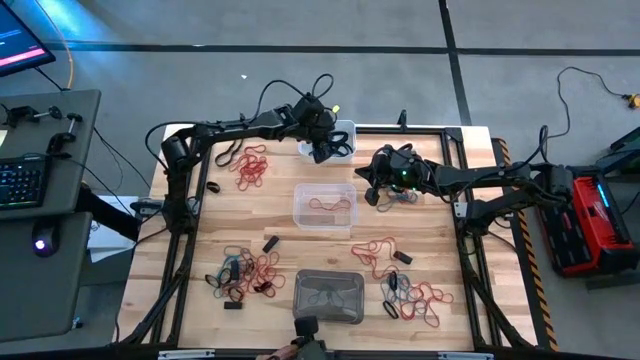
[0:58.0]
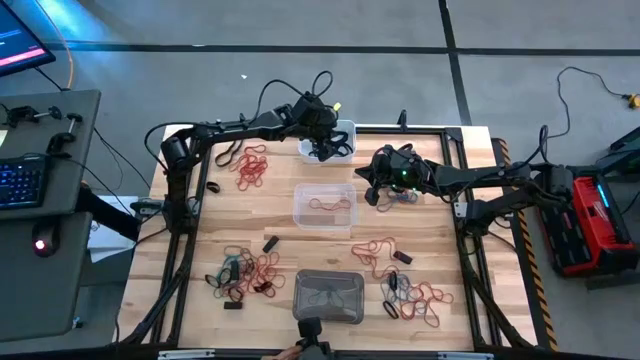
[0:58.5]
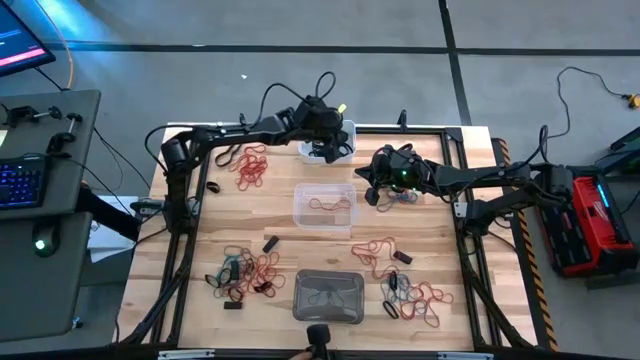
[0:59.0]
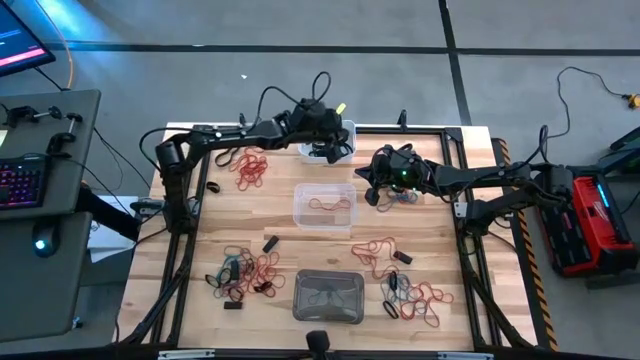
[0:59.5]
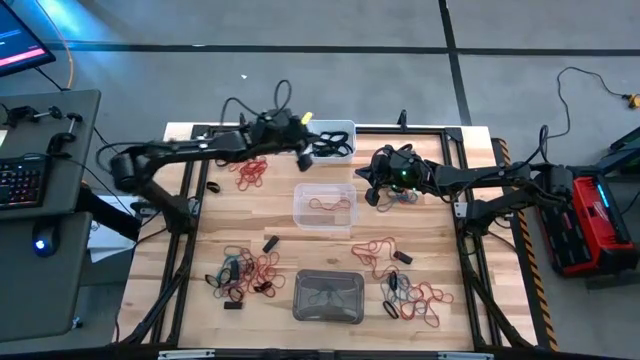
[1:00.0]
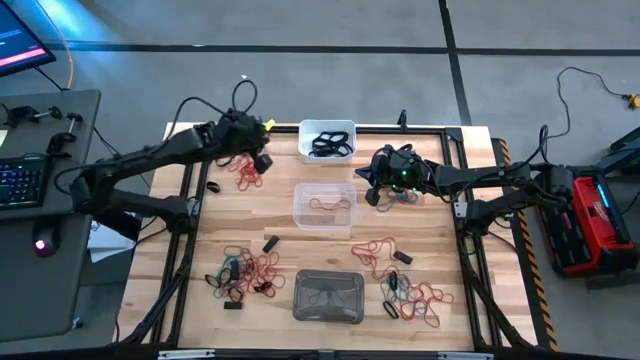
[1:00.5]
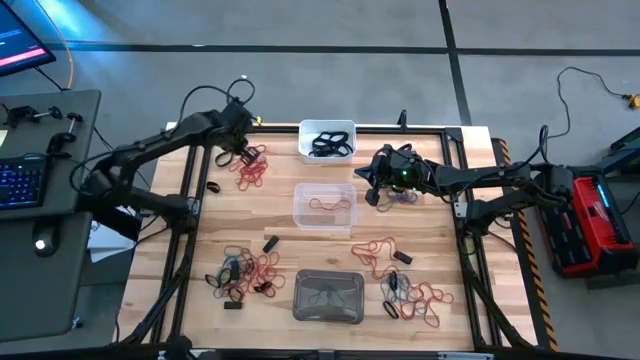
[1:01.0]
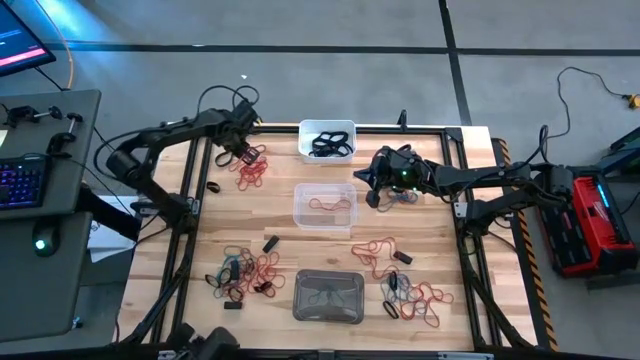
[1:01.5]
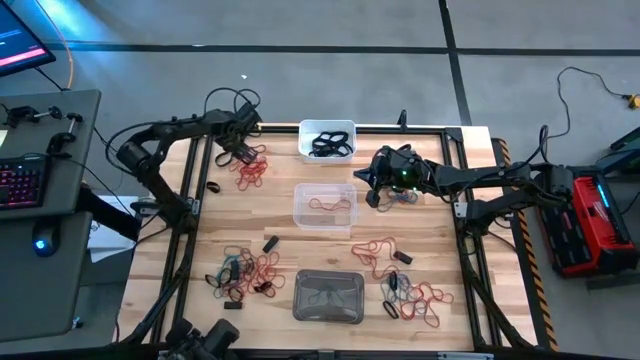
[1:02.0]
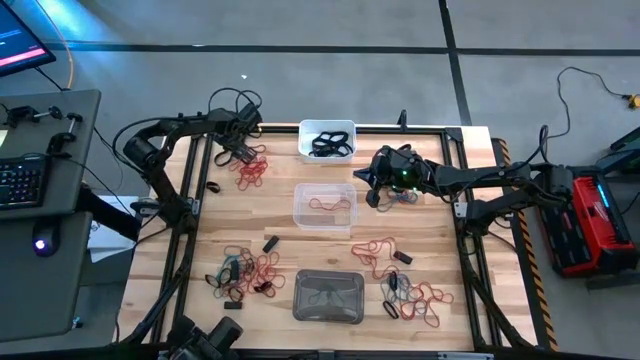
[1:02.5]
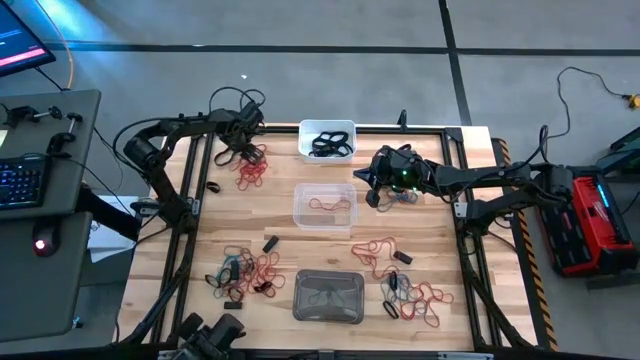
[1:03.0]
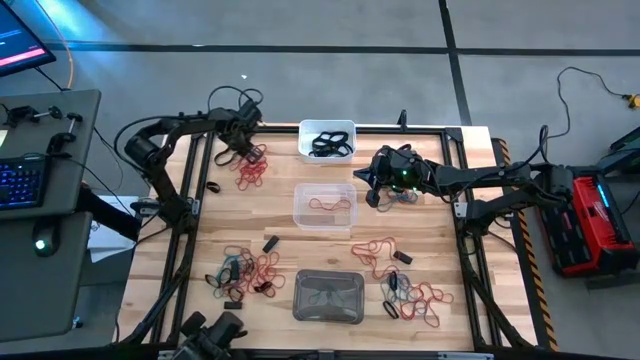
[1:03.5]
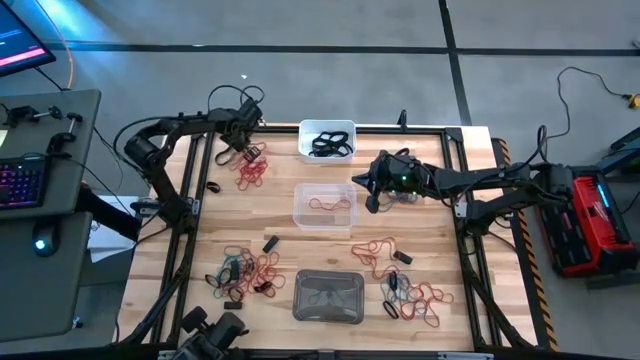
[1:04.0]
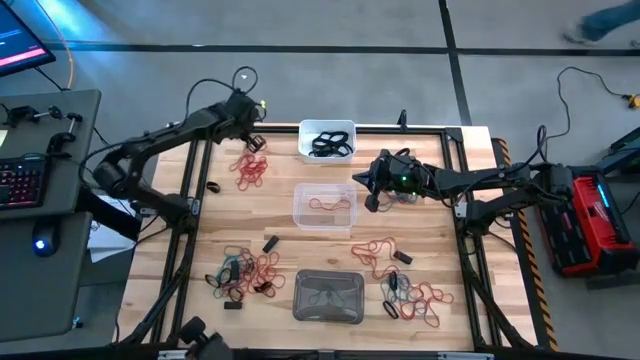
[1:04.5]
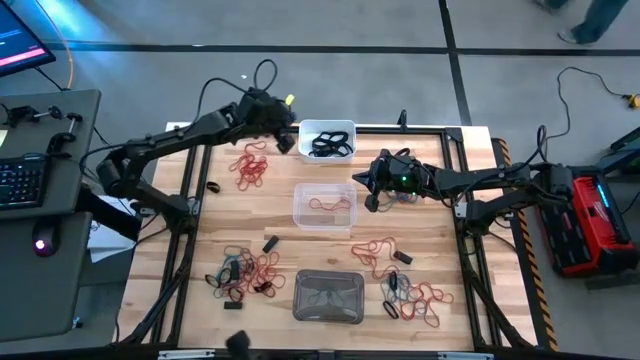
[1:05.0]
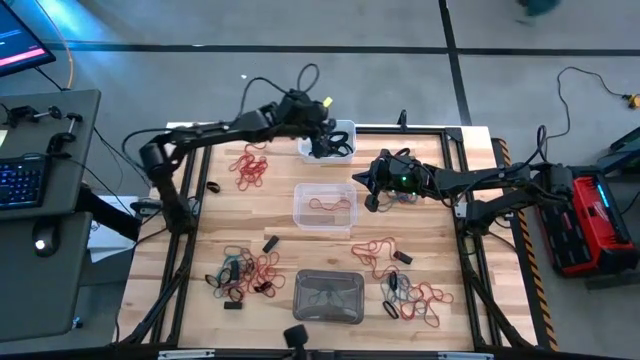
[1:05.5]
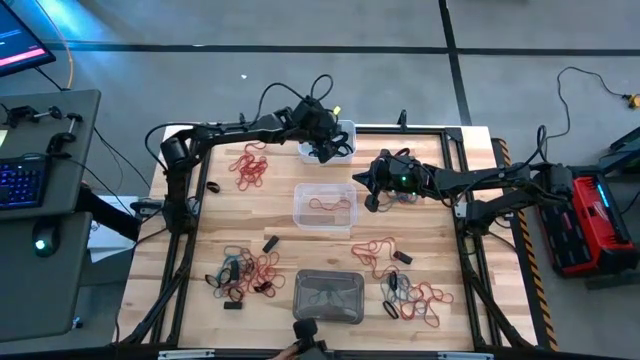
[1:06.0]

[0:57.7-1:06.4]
Task: Sort rubber bands into baskets
Put the black rubber band into the white bin

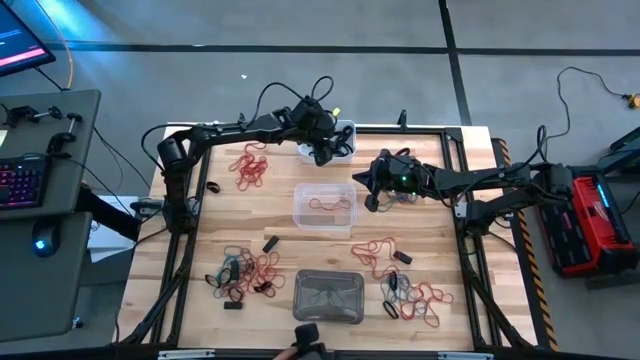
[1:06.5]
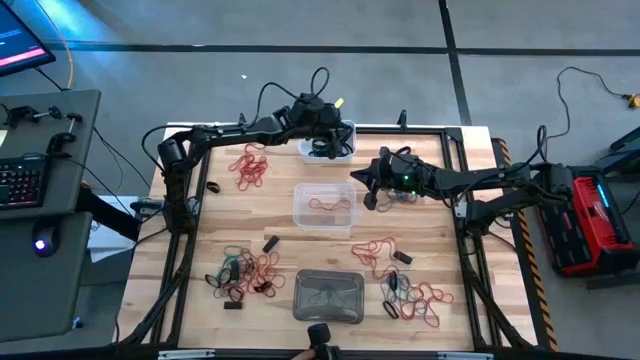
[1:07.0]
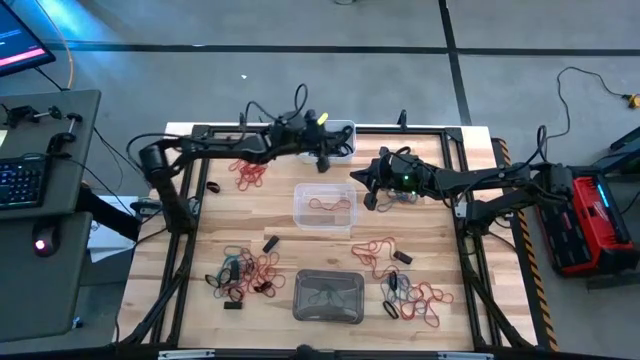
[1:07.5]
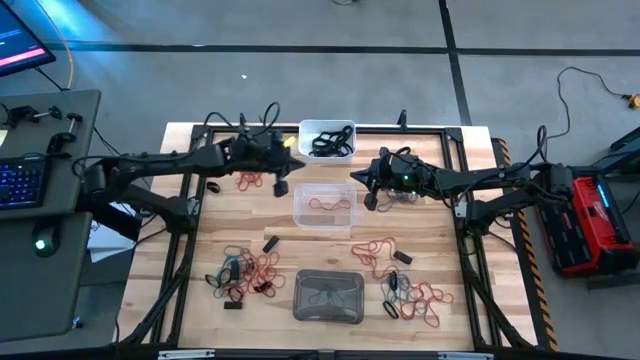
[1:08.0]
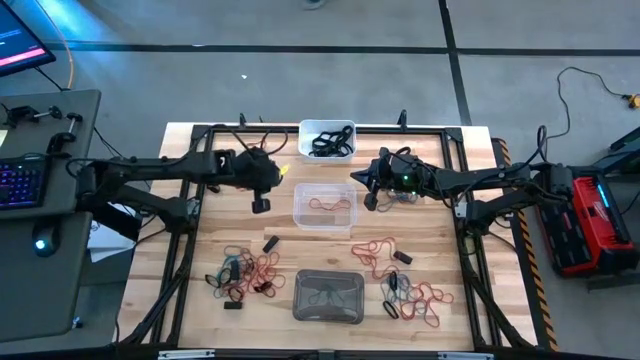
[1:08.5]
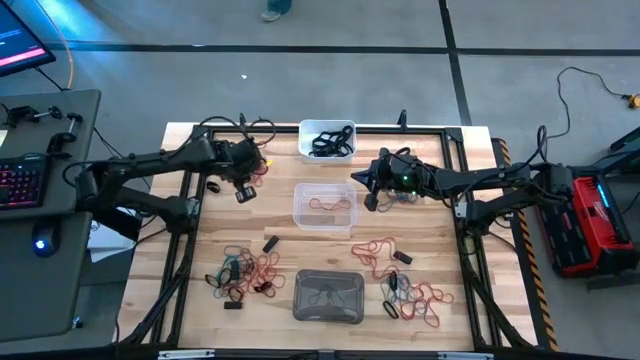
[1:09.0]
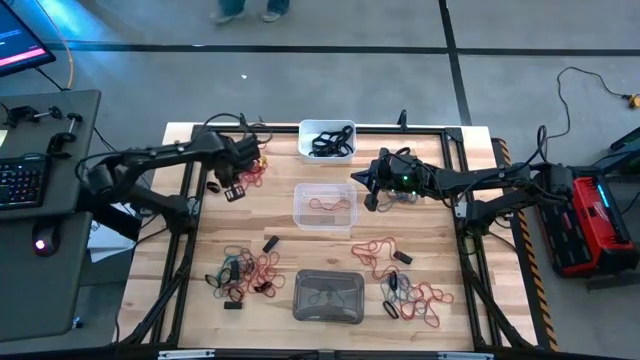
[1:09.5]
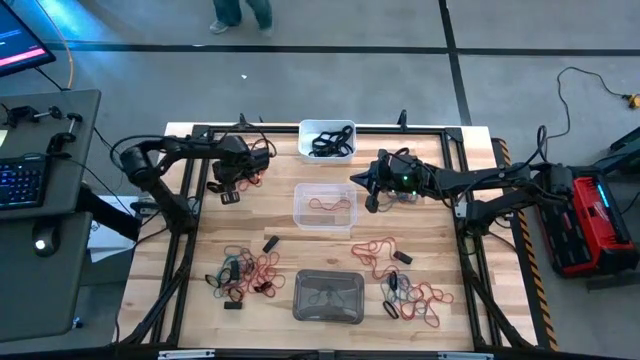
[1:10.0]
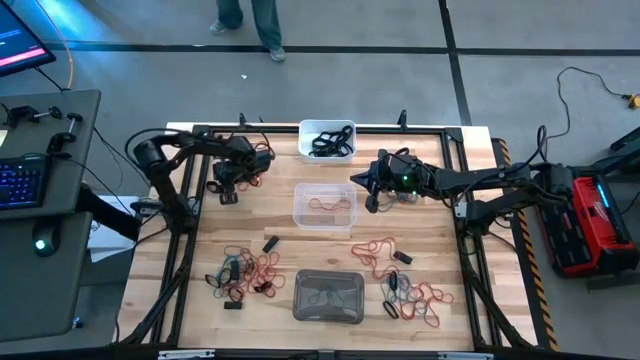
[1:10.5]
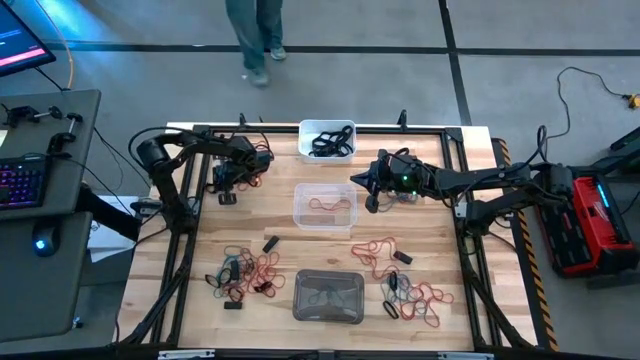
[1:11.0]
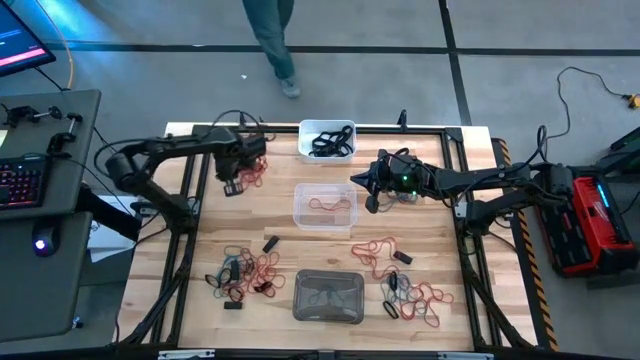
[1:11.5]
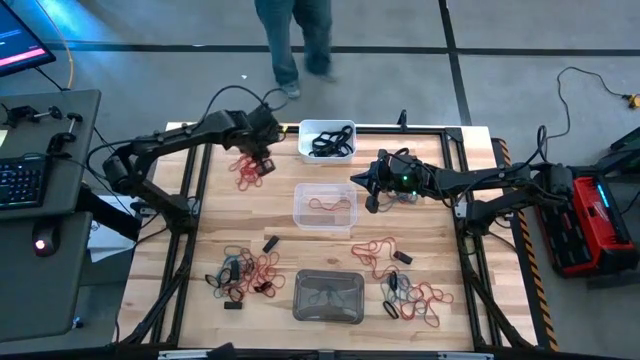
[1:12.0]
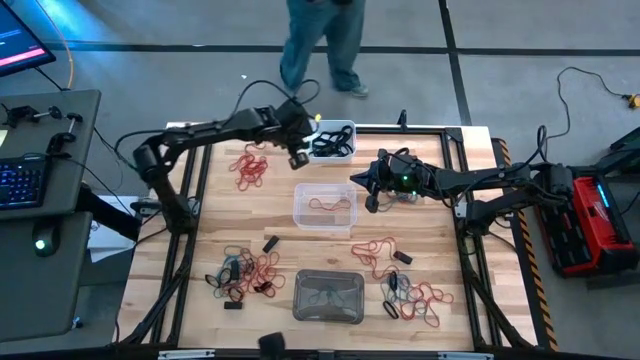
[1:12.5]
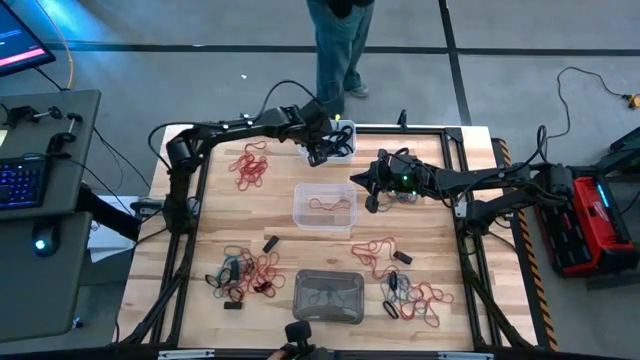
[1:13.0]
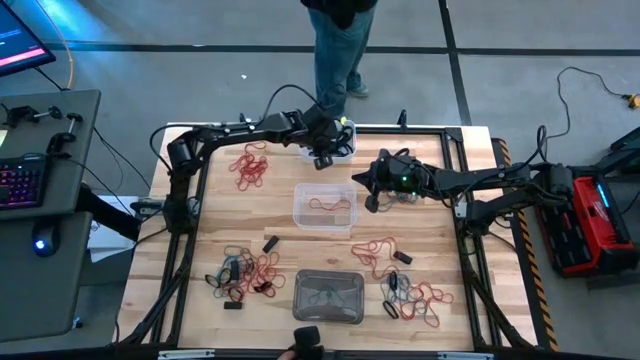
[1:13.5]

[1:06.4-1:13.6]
Put the black rubber band into the white bin

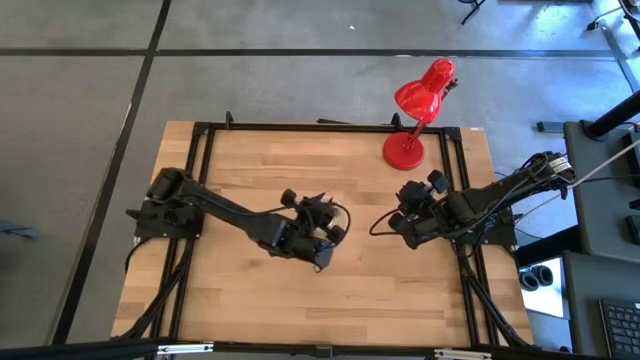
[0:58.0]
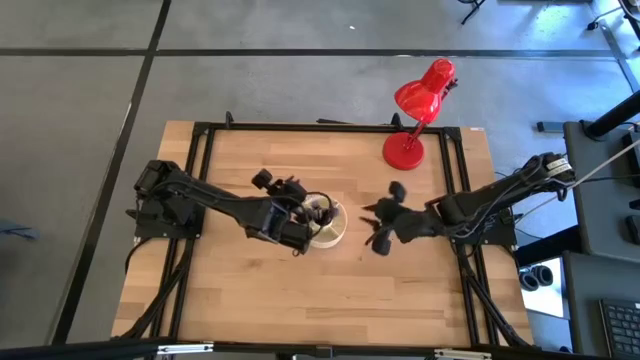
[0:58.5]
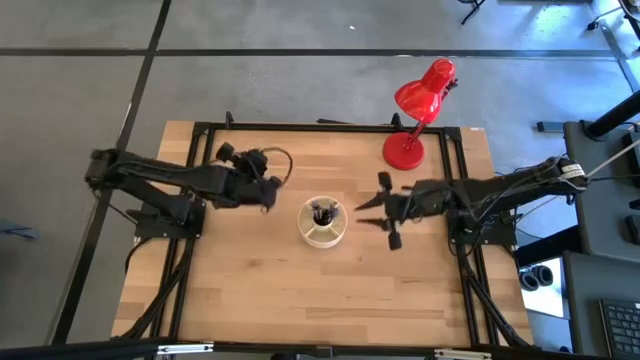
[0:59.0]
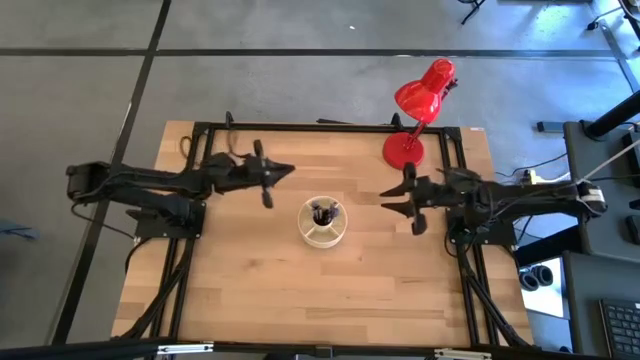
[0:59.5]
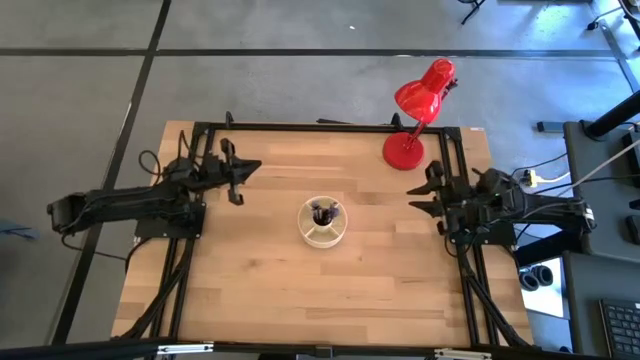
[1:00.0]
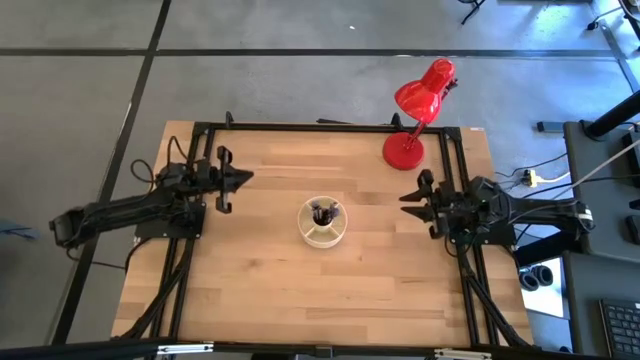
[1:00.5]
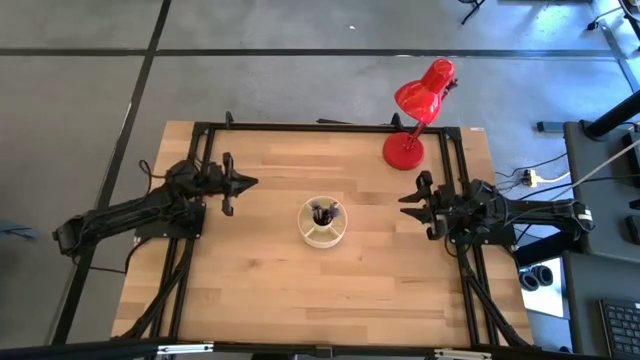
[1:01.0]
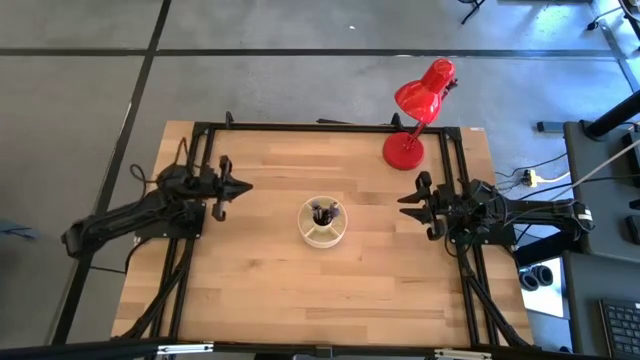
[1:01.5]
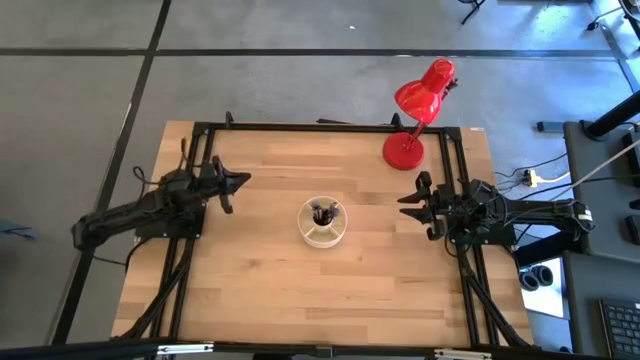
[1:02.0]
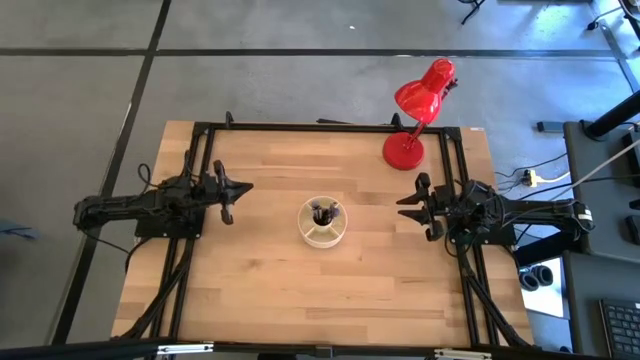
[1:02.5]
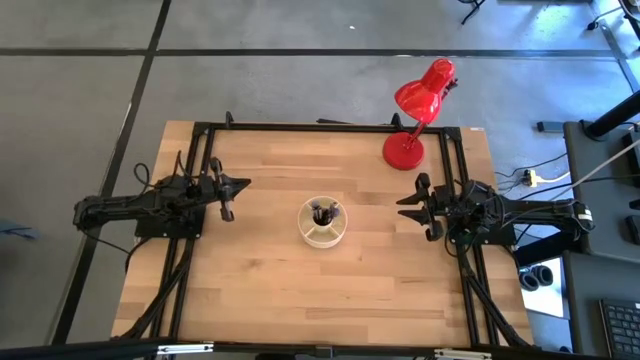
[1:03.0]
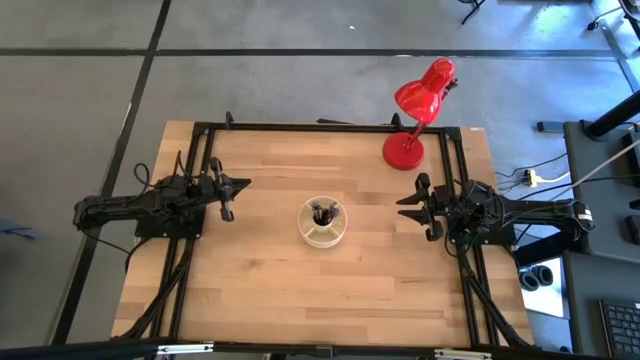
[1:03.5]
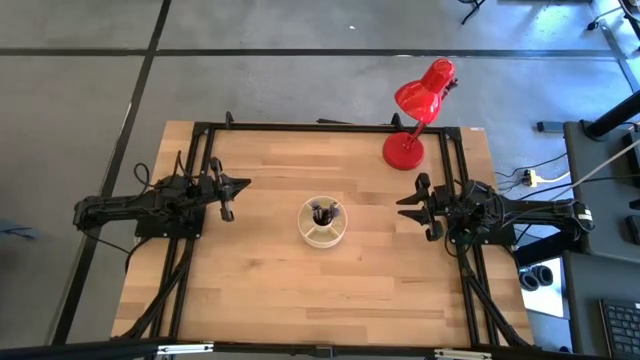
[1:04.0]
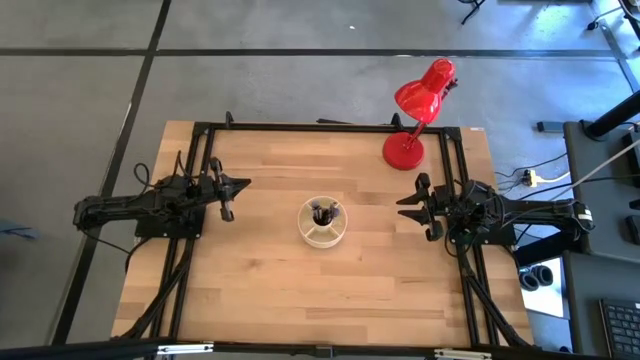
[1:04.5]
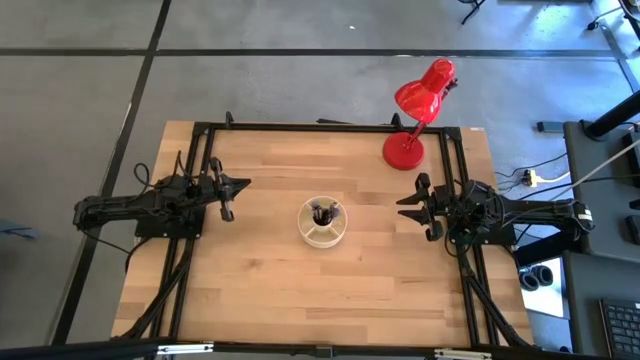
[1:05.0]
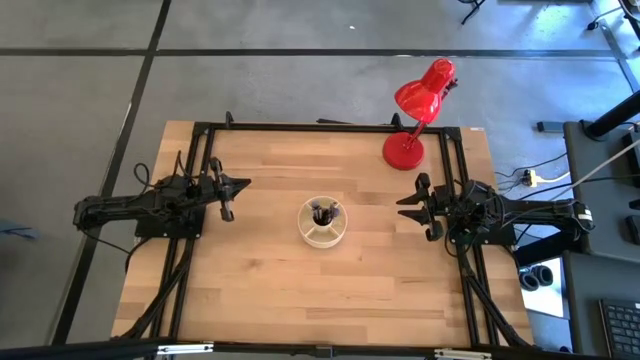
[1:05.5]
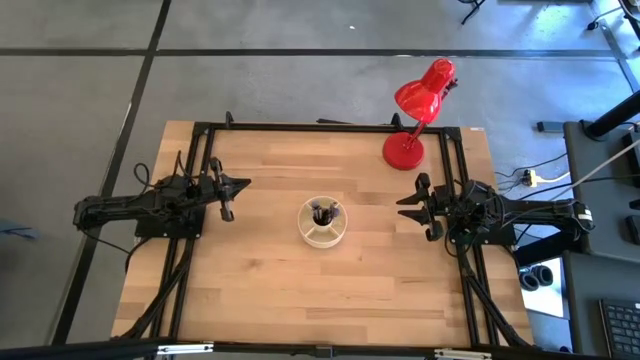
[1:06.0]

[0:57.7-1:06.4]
Task: Put items in baskets/containers
Return to Home Position
